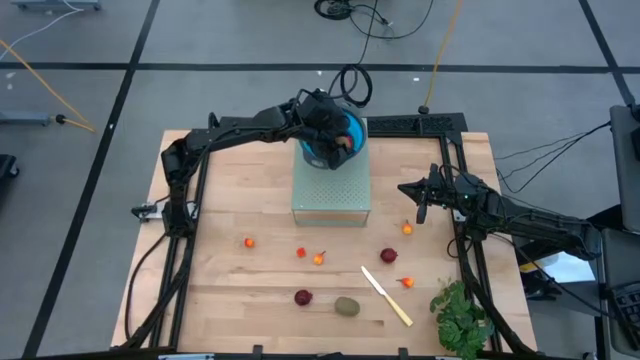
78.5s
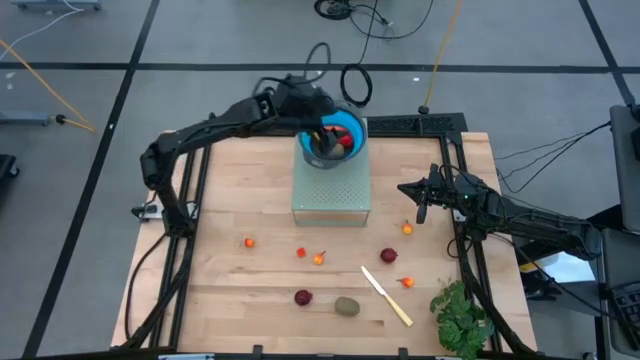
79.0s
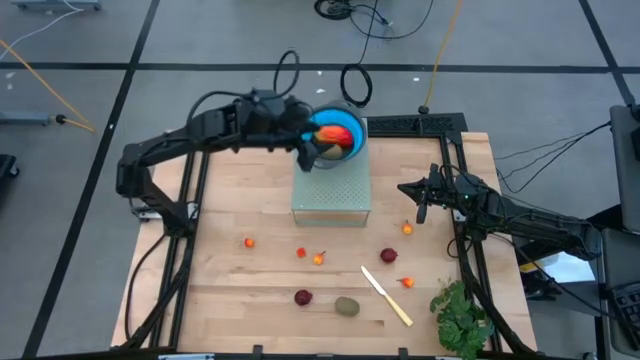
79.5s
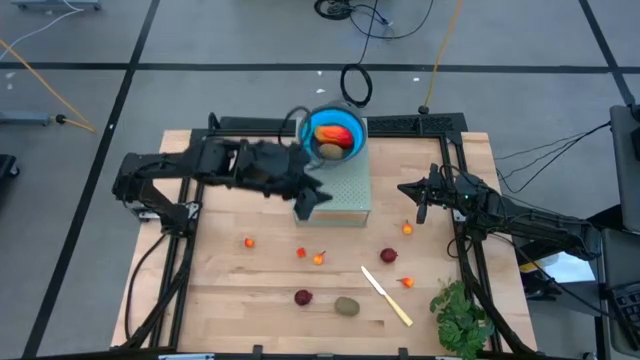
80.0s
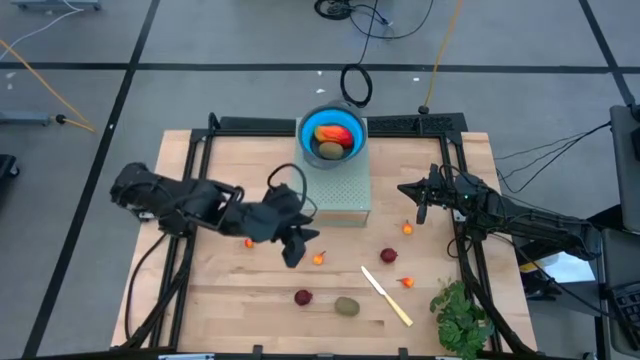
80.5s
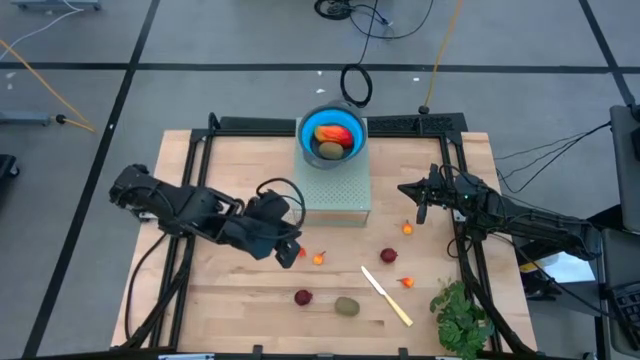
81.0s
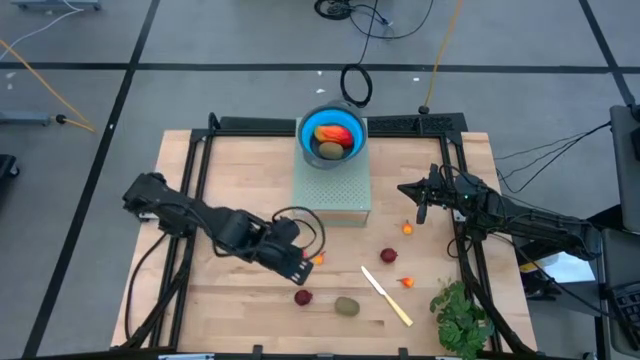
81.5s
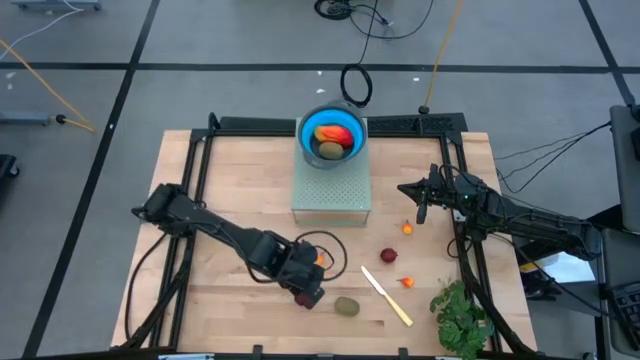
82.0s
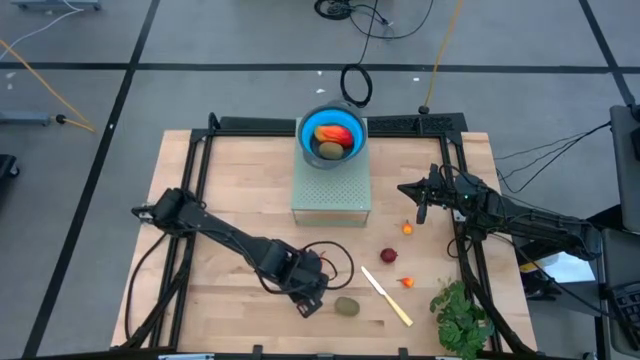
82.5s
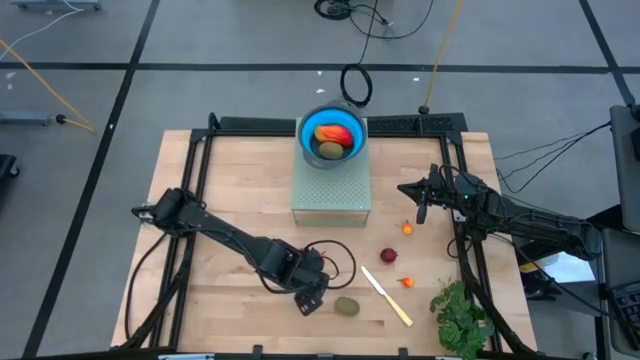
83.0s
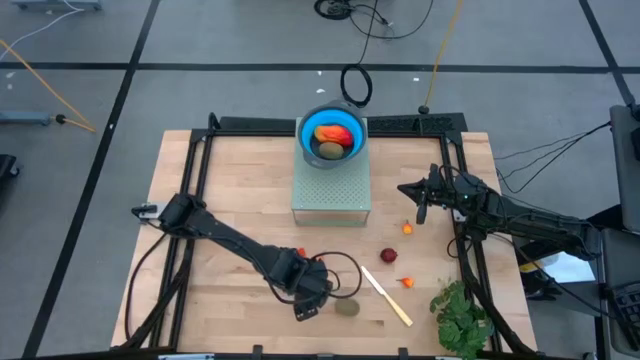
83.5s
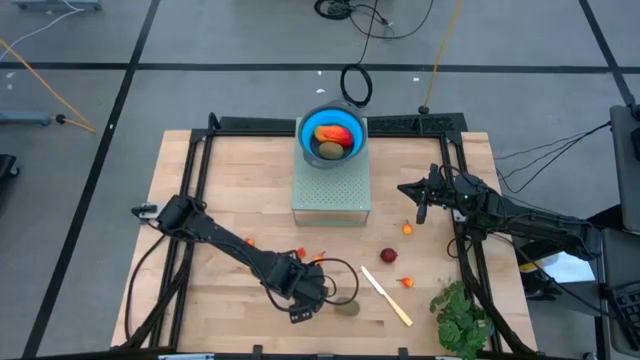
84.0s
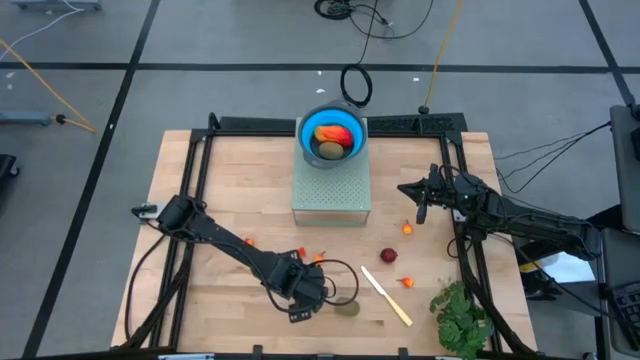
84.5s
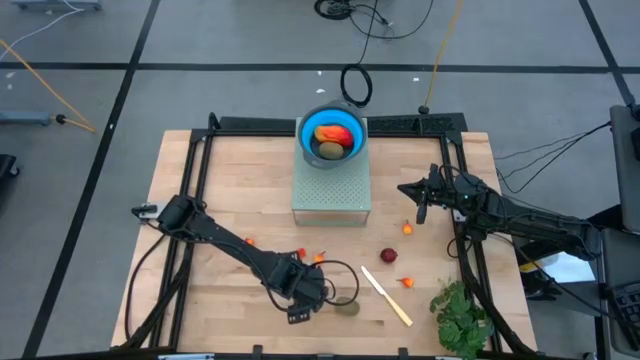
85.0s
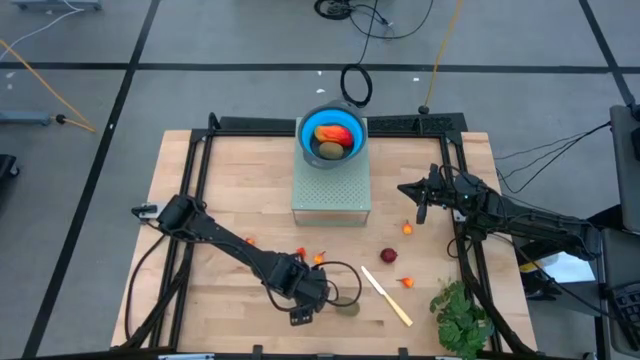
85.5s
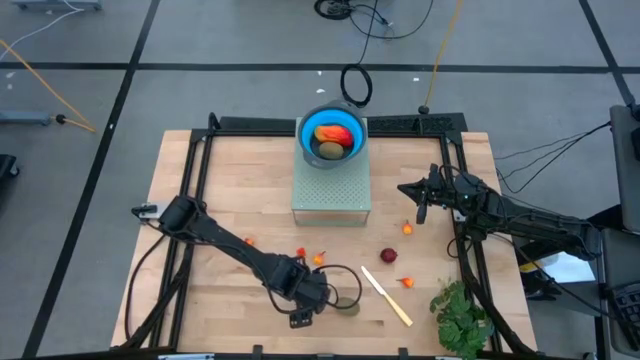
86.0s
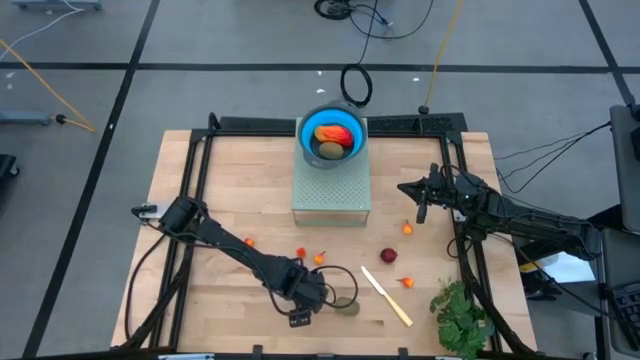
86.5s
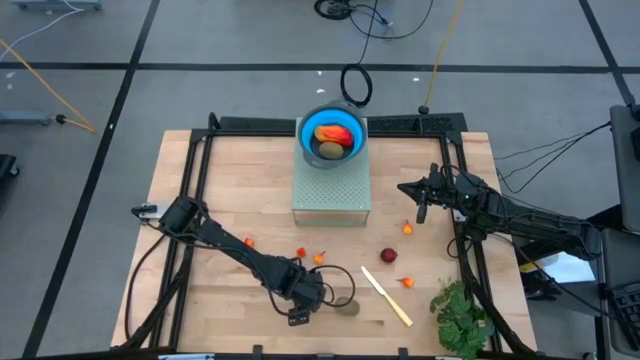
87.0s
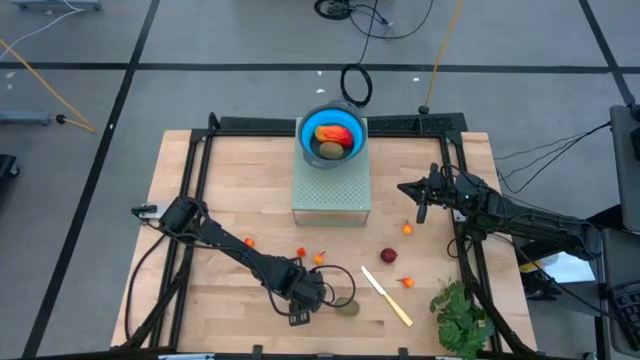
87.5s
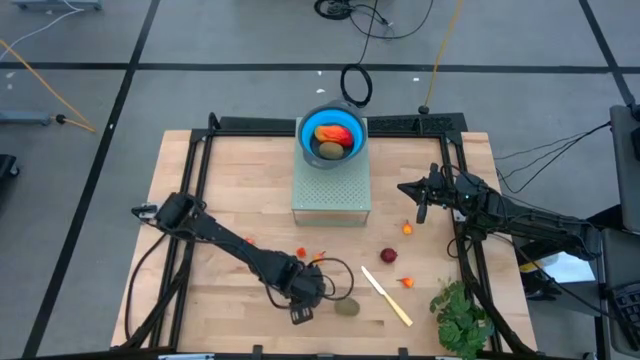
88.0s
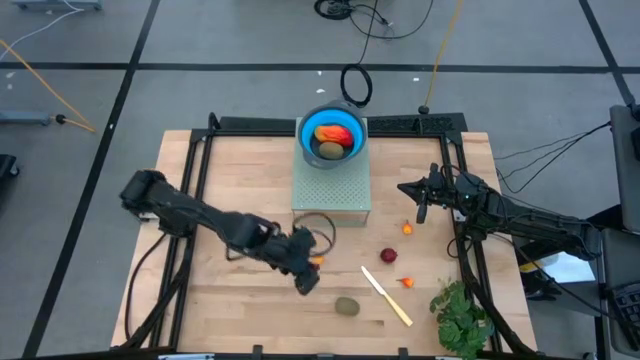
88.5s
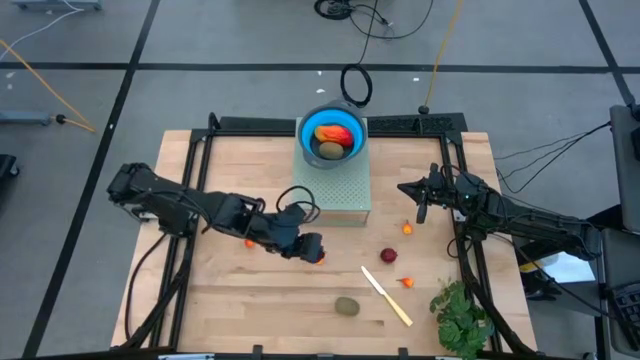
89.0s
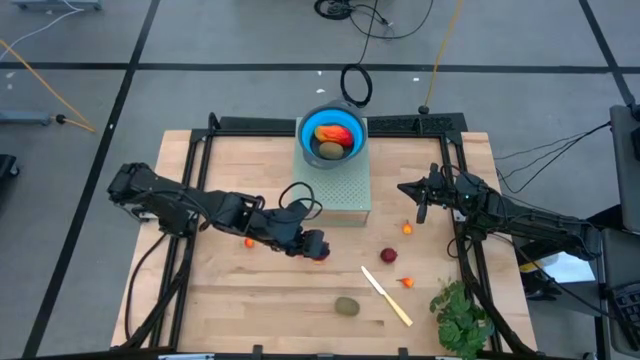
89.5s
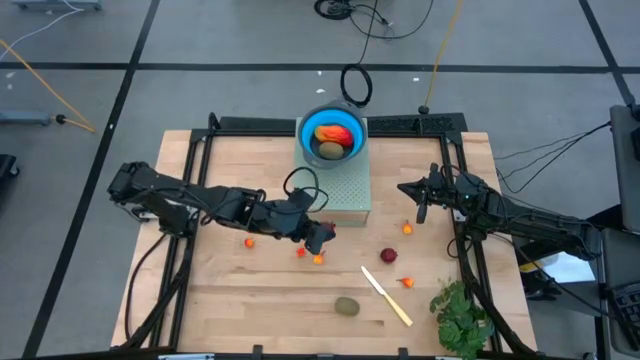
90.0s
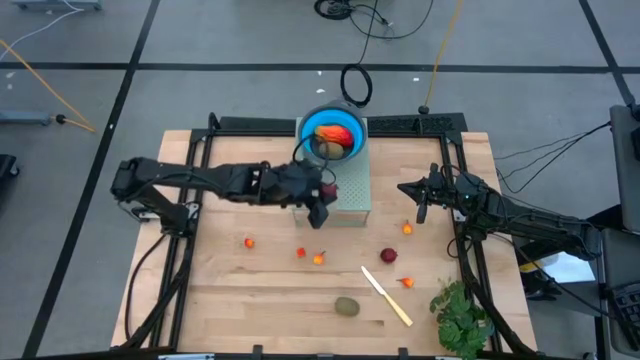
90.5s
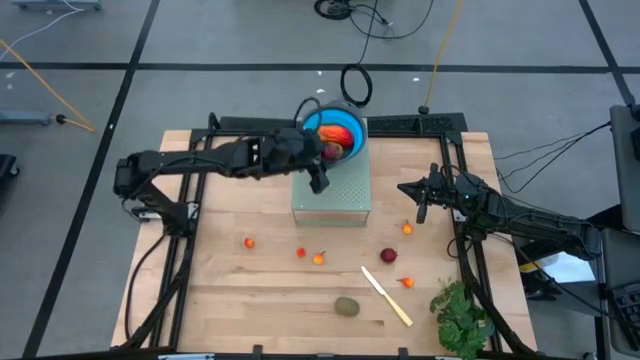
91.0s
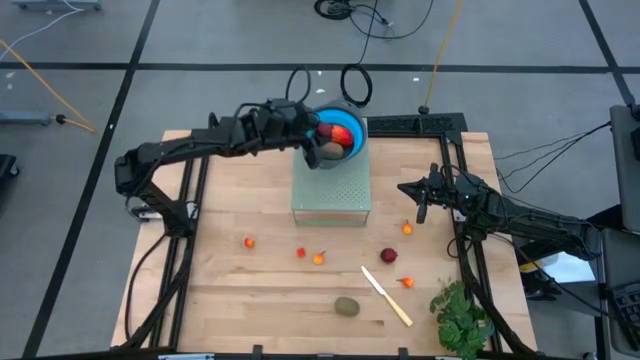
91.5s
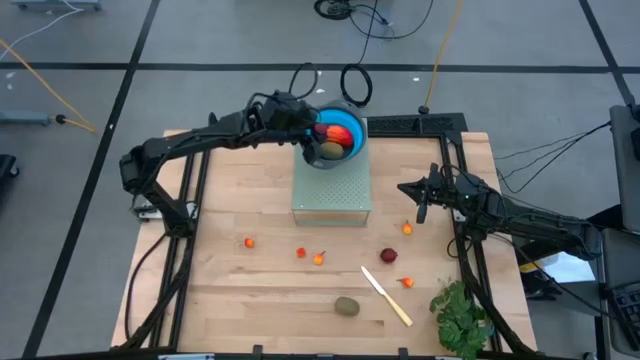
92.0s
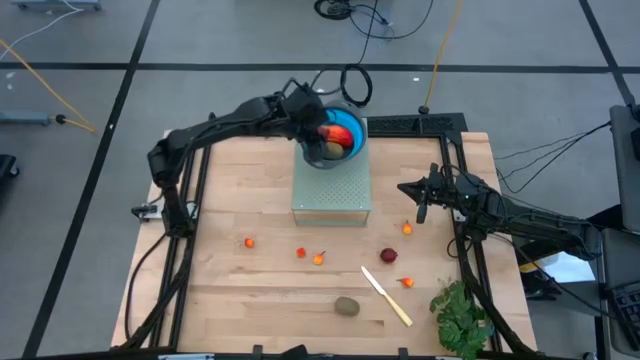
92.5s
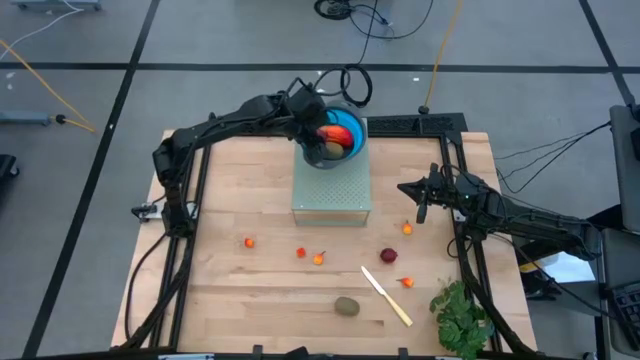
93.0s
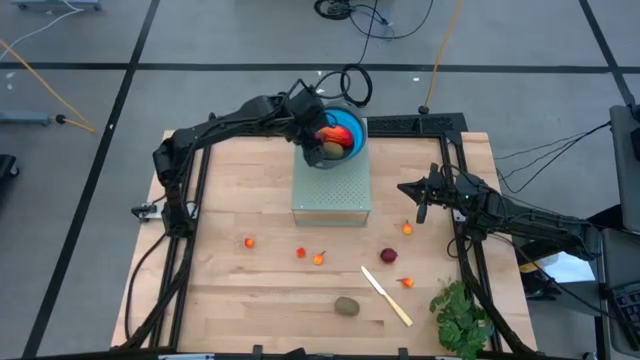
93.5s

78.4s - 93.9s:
Task: Pick & Place Fruit
Put the red pomegranate into the blue strainer bowl on the shelf

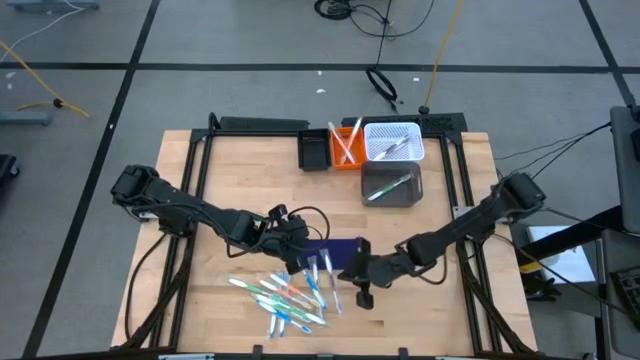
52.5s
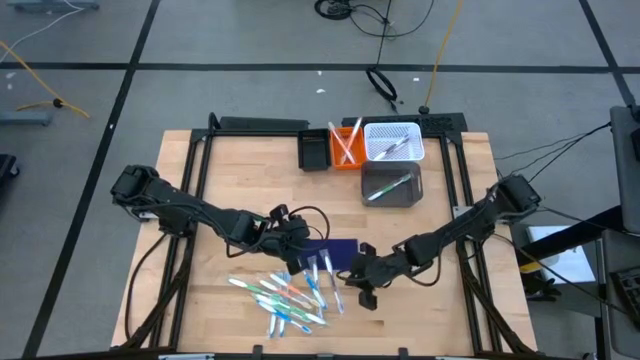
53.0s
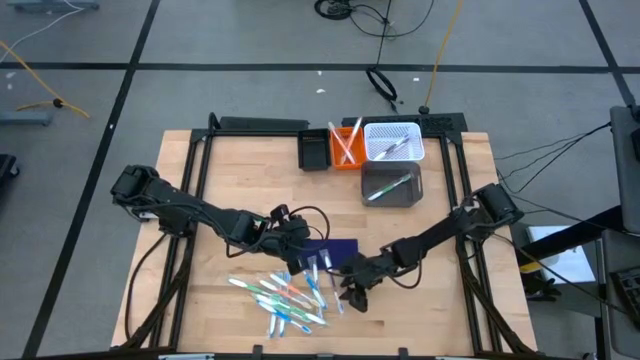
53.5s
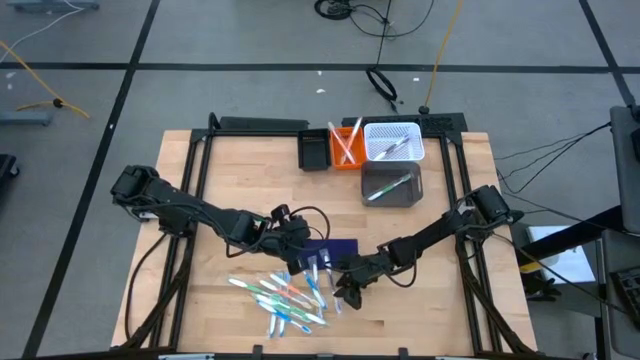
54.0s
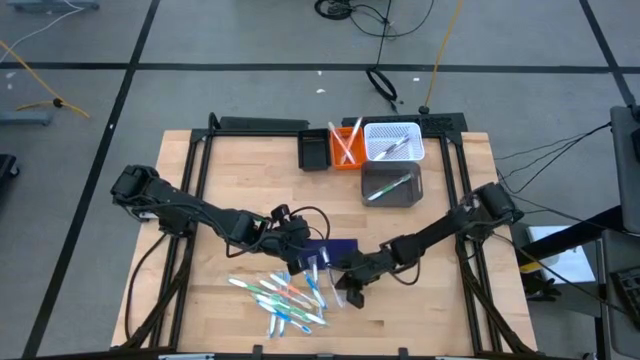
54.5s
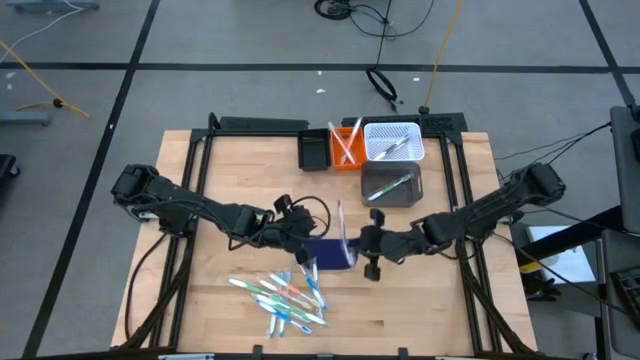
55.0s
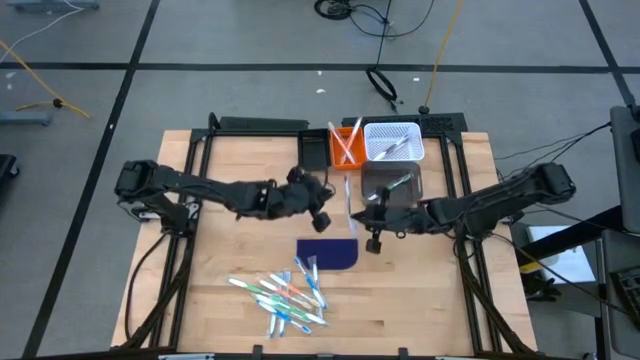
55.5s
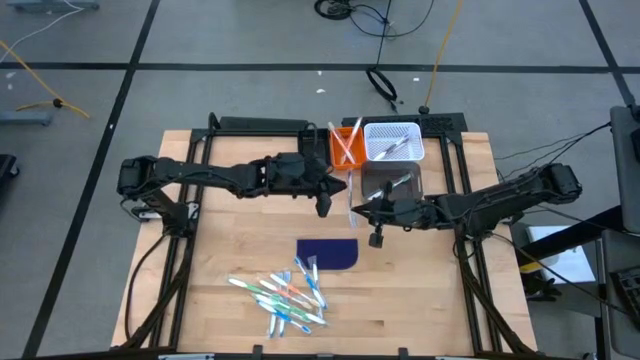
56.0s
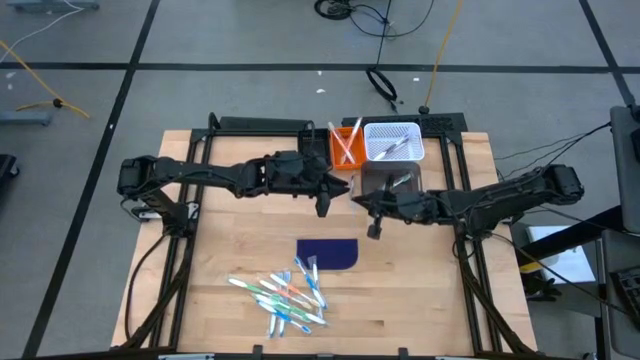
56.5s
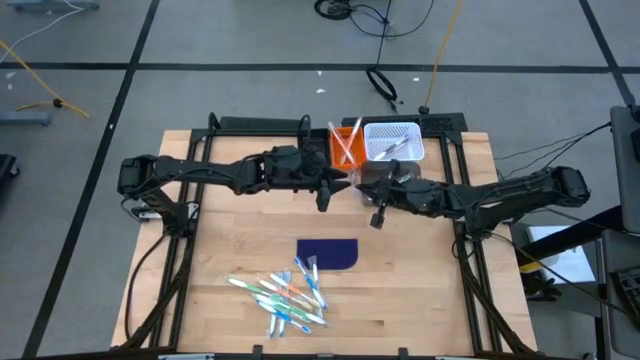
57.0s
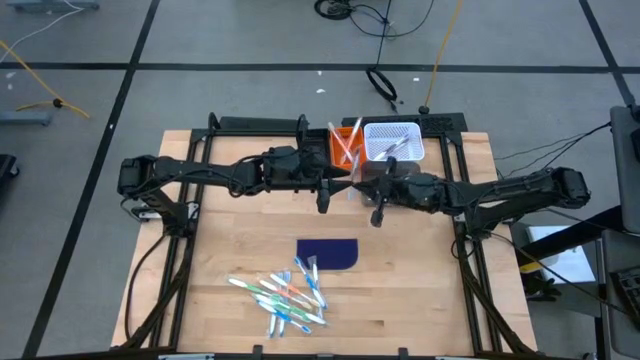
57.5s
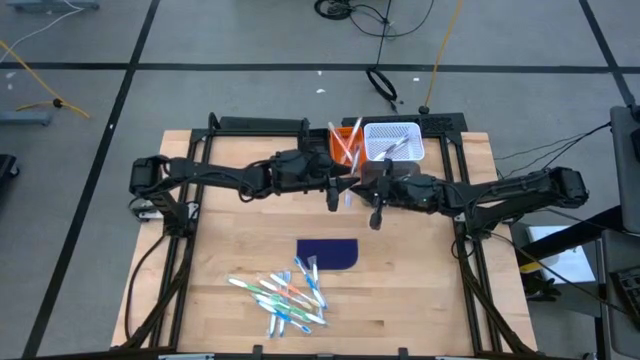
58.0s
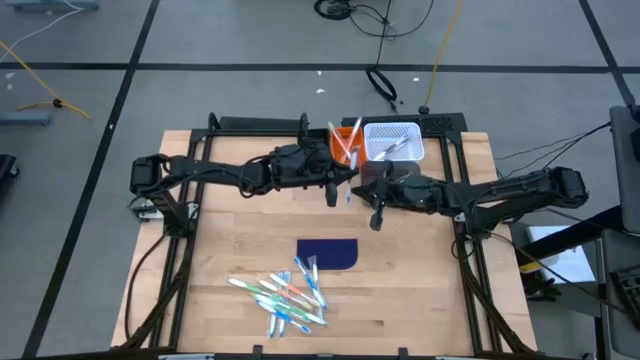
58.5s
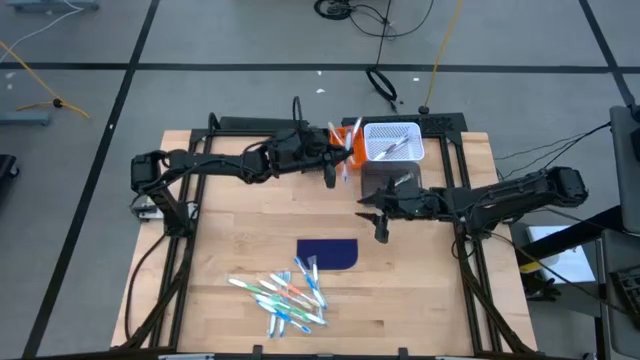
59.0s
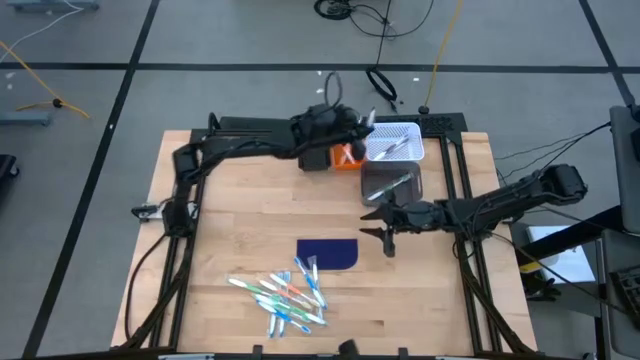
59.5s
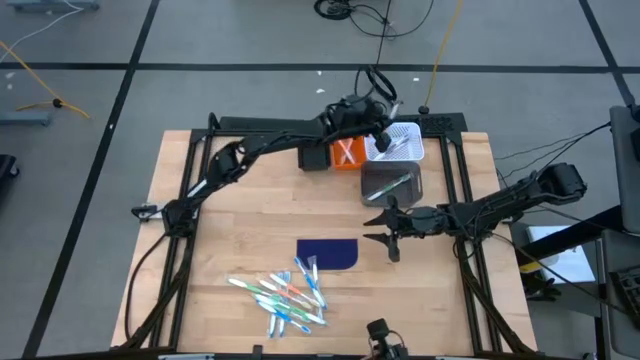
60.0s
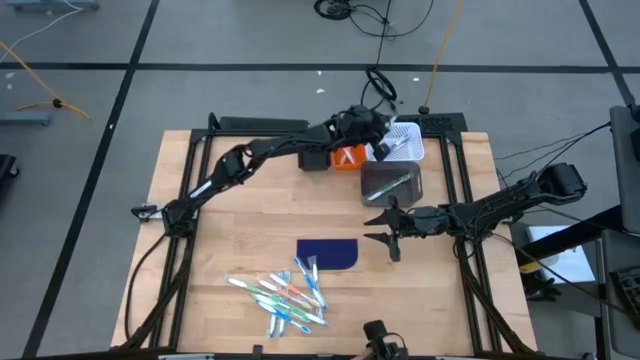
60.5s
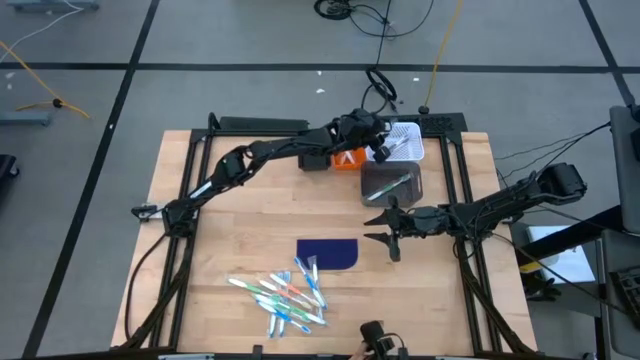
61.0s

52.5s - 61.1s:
Task: Pick & Place Toothbrushes
Put the purple toothbrush into the white bin
